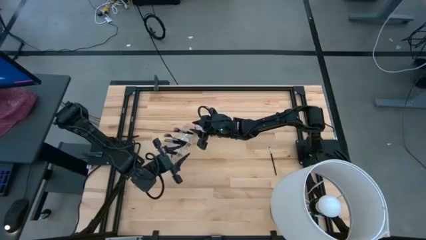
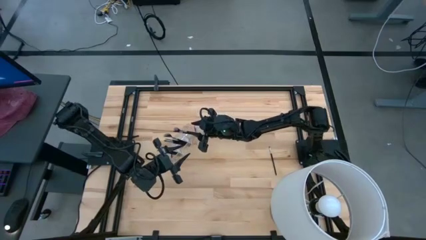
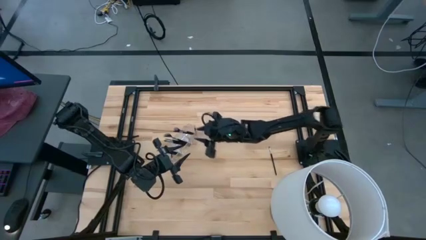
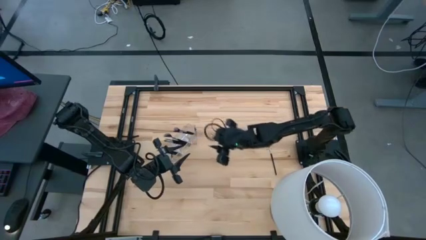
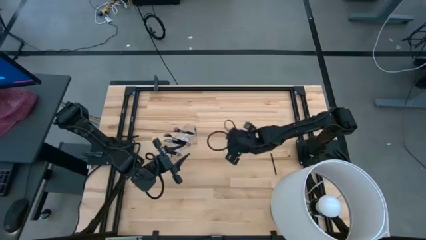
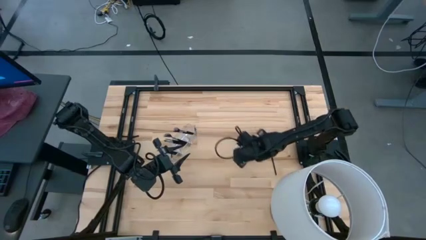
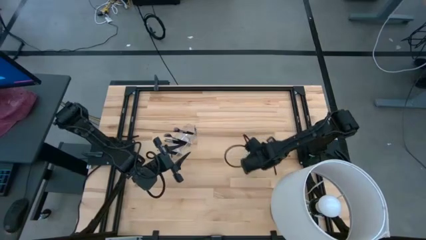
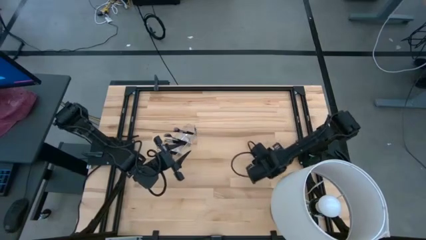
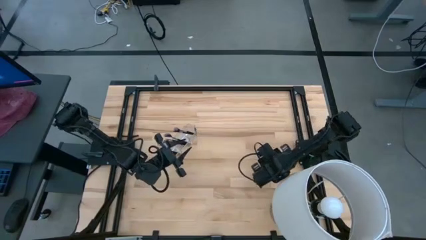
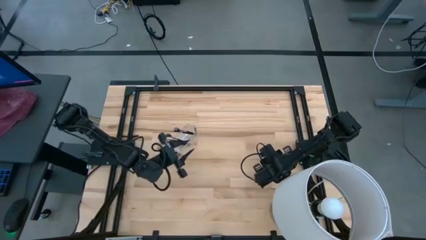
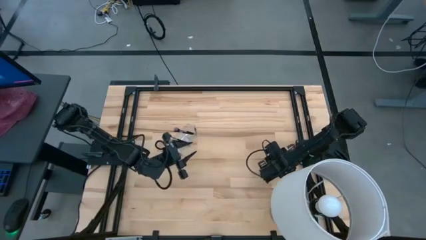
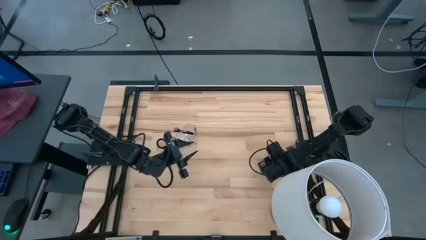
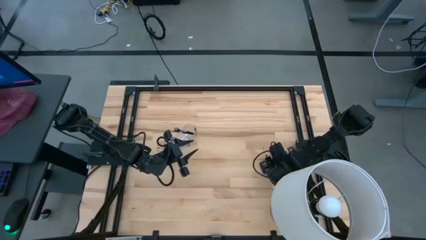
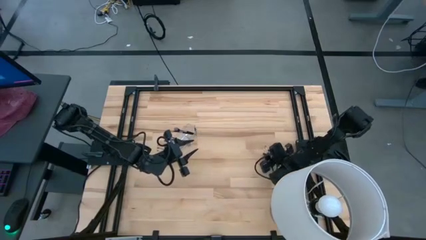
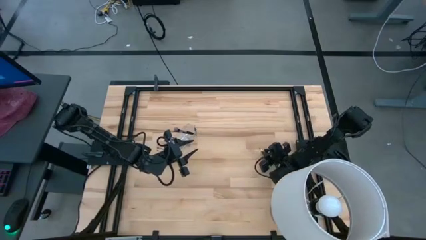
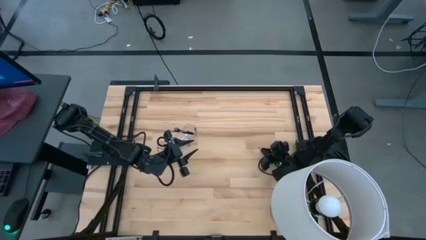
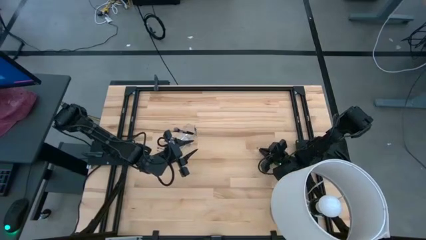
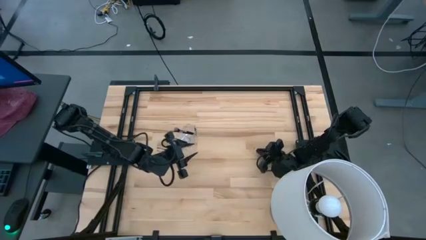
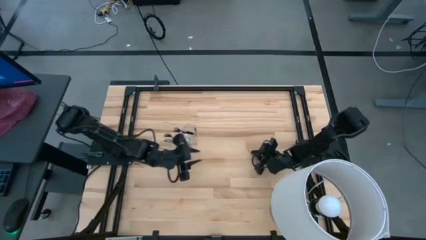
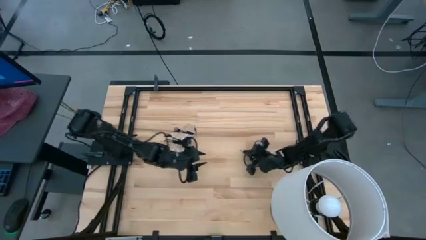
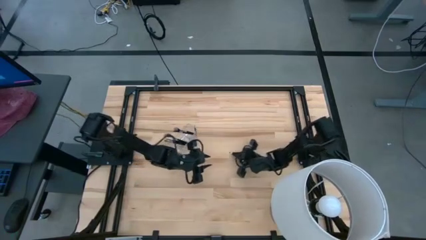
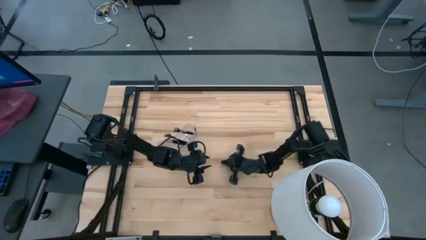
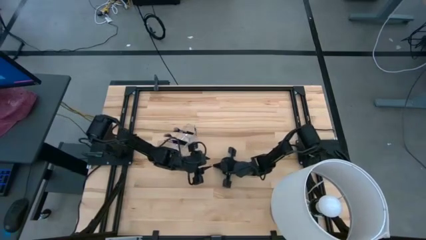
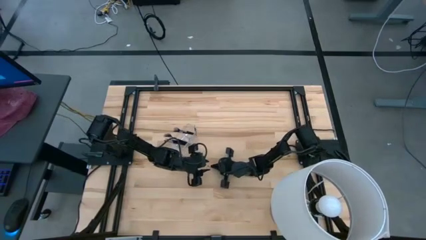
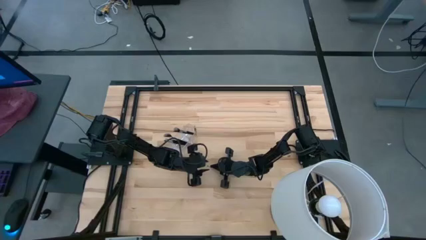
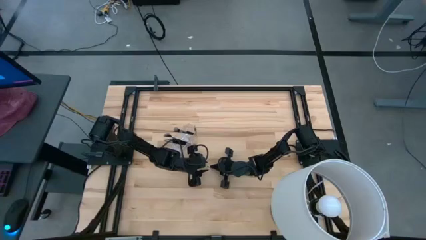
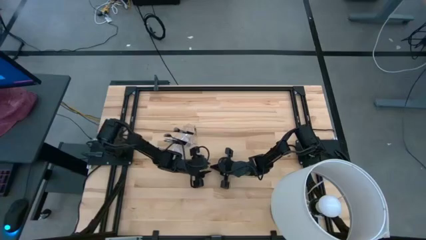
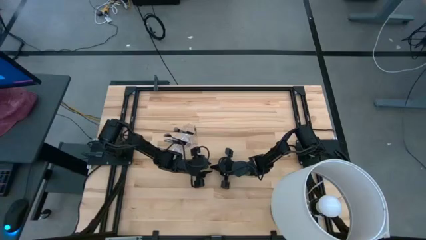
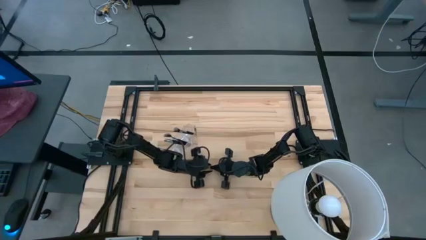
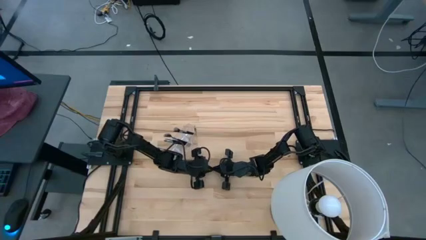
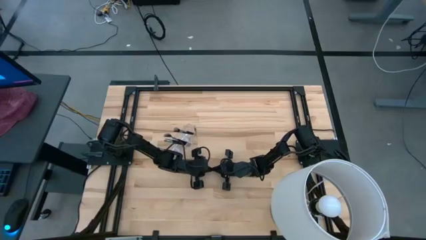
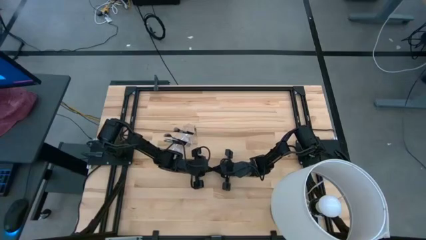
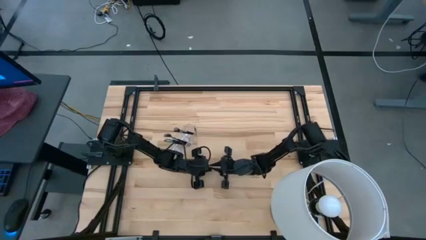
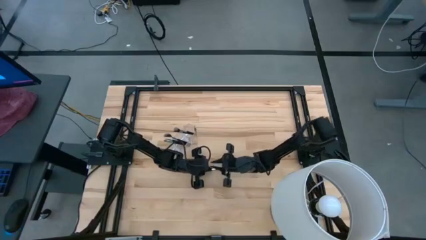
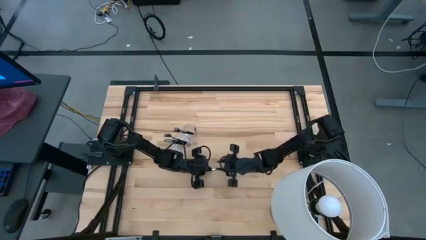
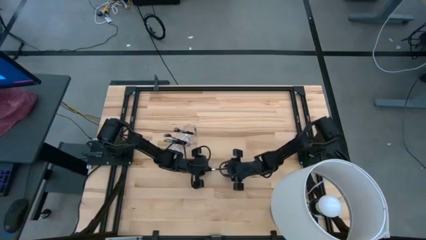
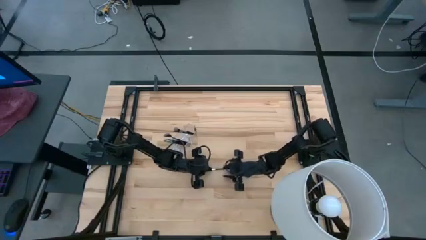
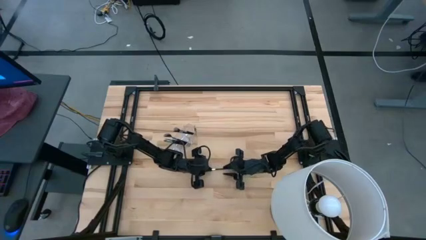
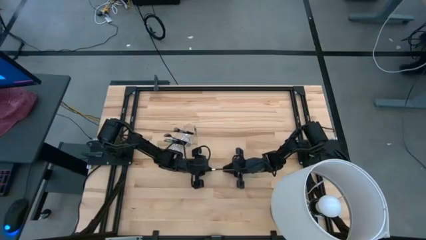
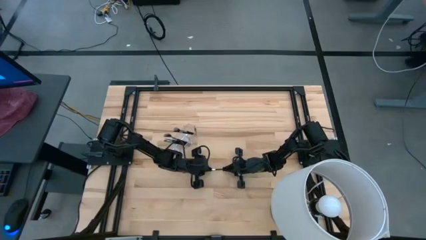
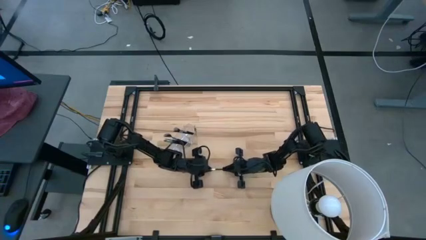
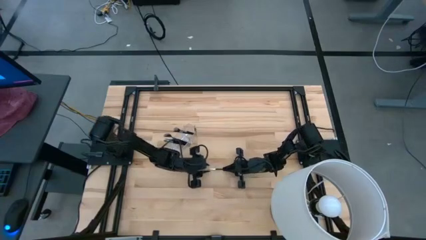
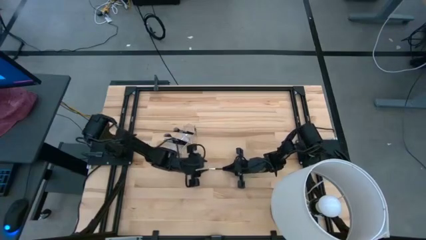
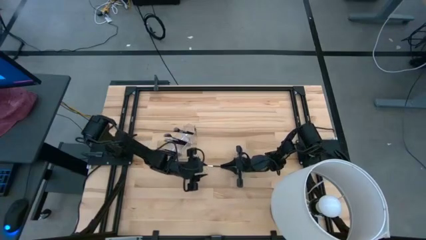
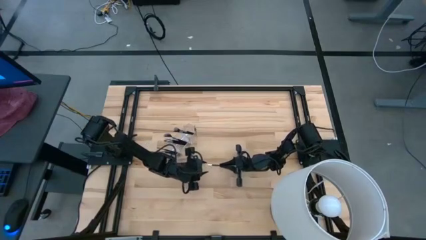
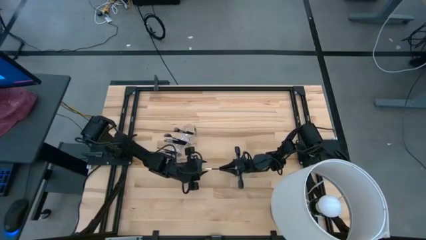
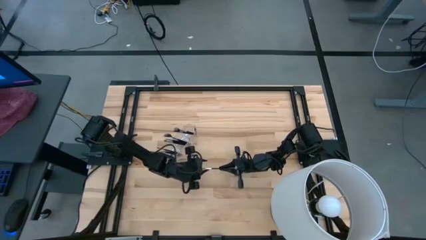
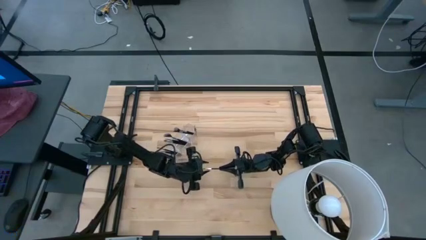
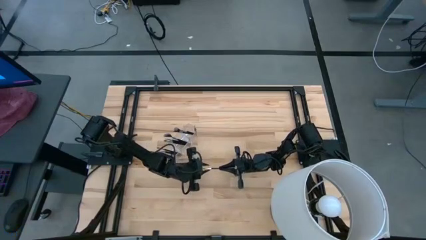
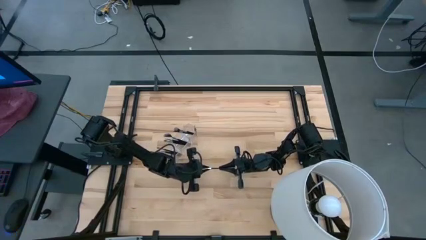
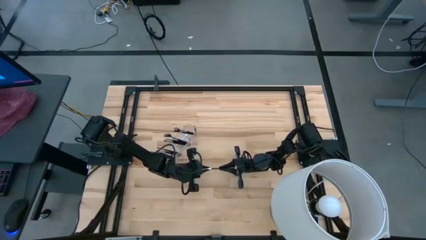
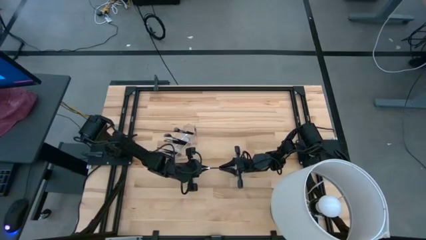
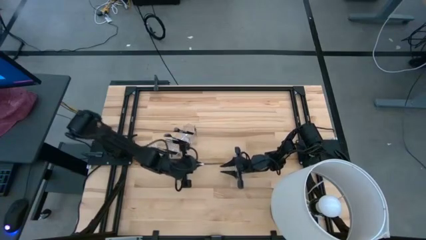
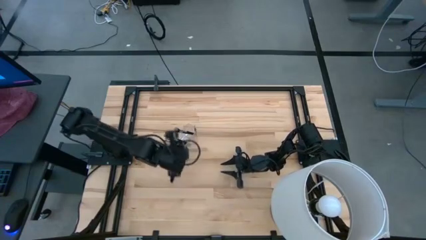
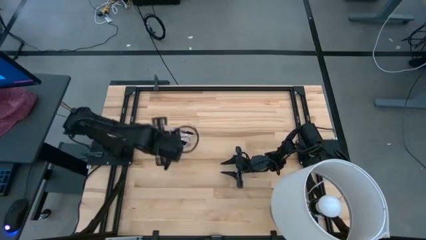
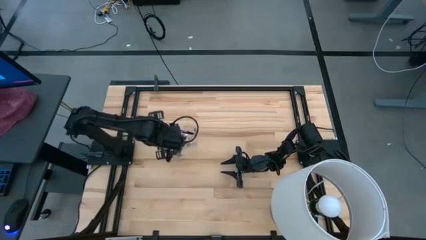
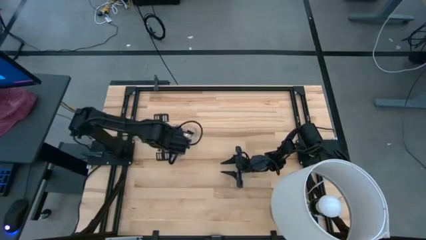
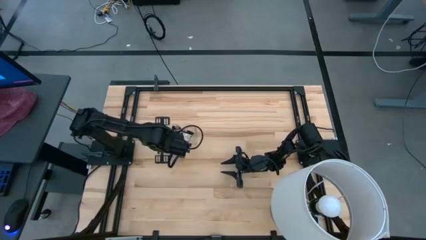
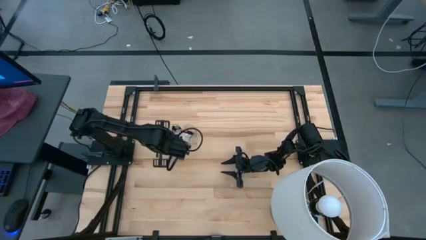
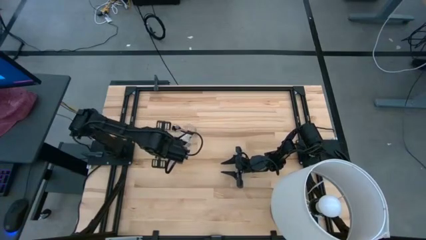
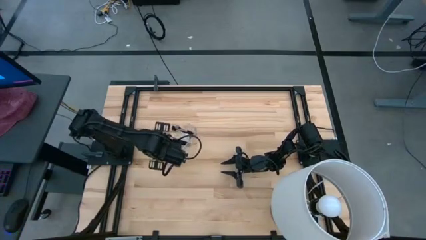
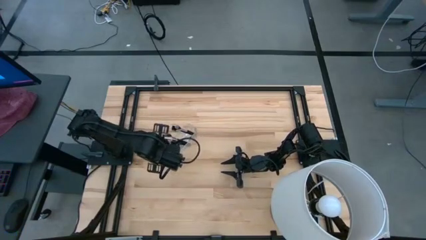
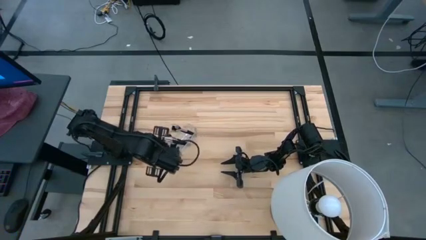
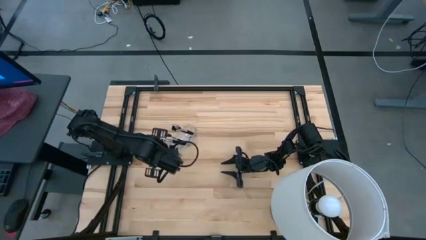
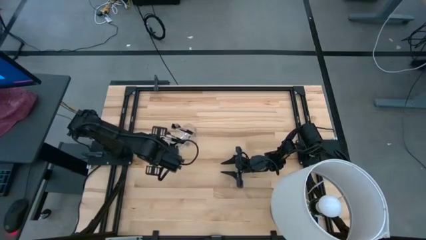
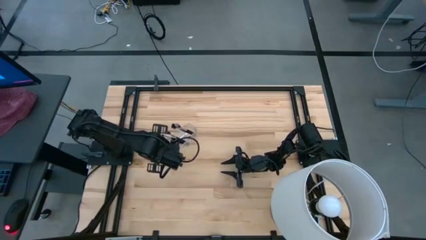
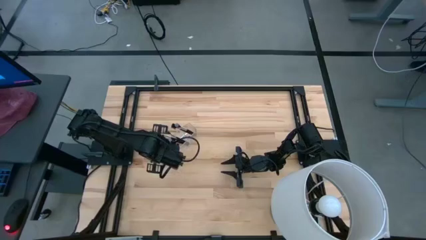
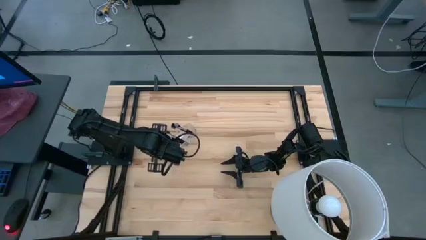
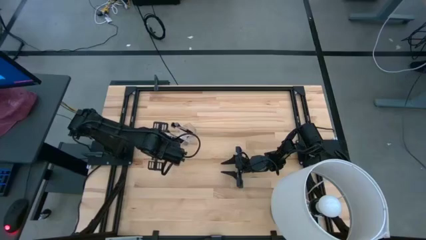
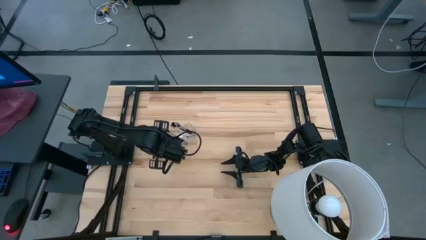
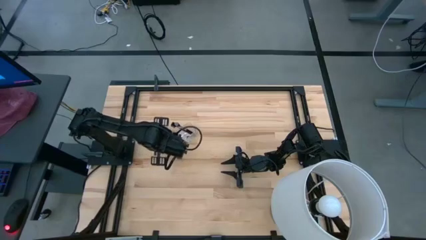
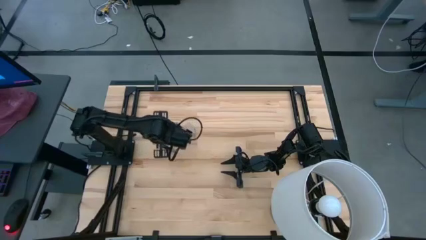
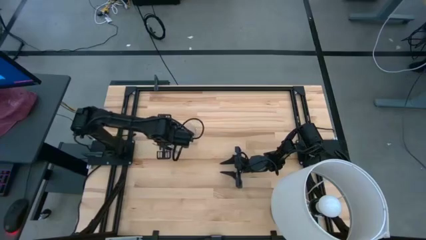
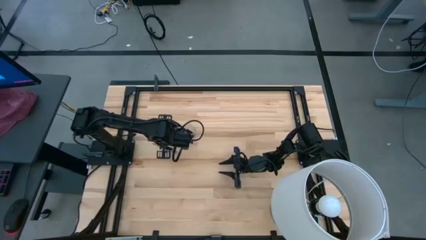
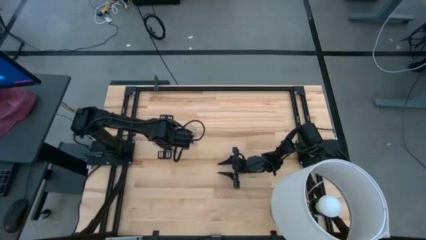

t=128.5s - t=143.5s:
Task: Put items in baskets/containers
Put the eyeshadow brush into the middle section of the transparent organizer

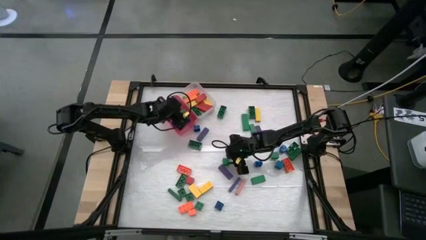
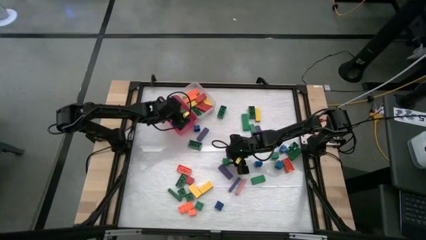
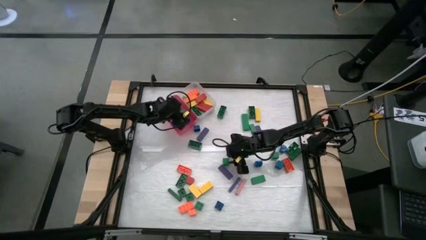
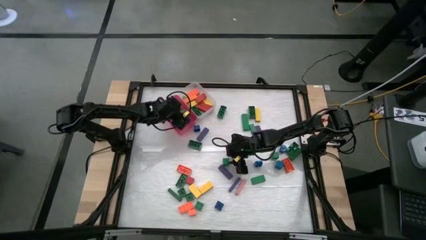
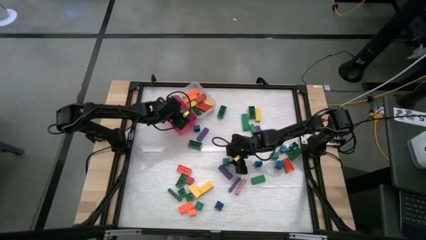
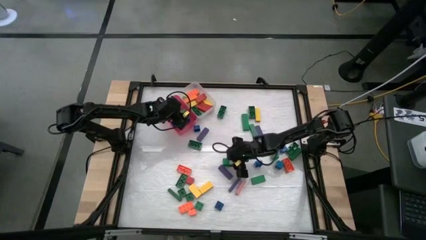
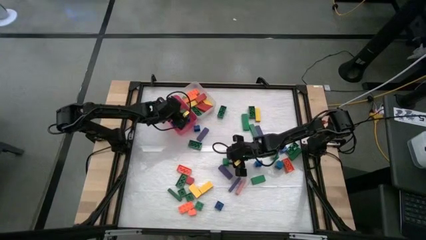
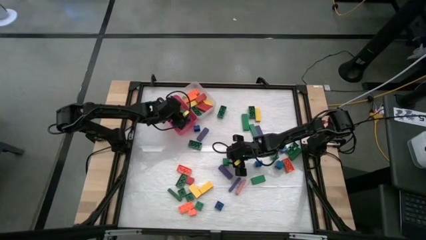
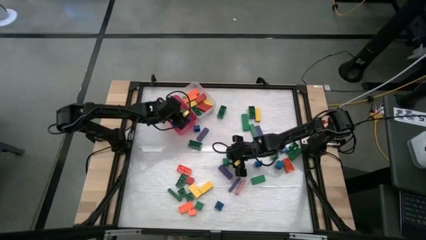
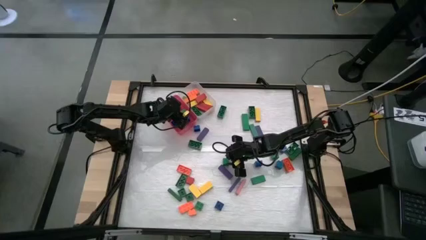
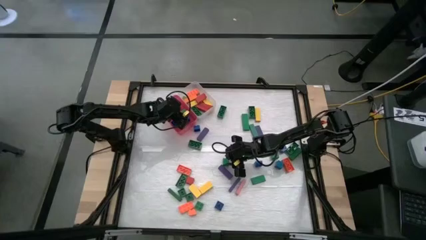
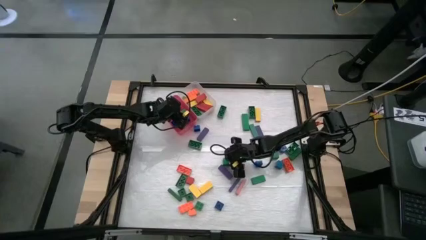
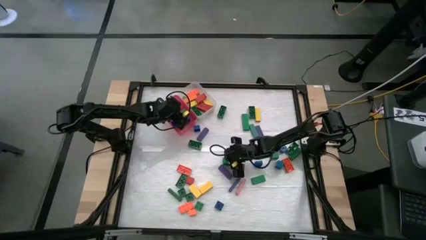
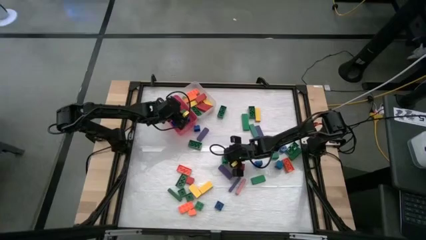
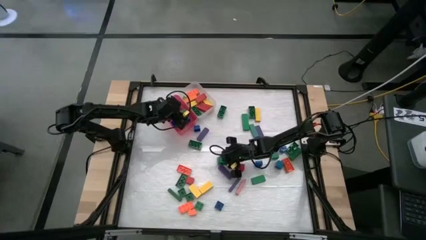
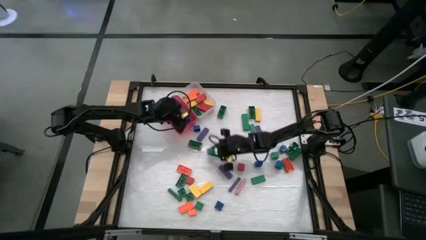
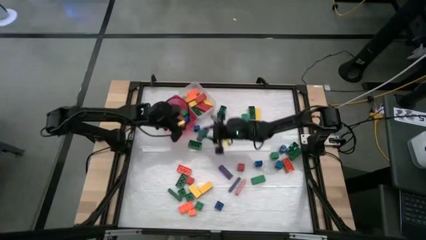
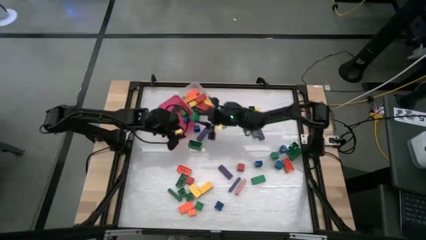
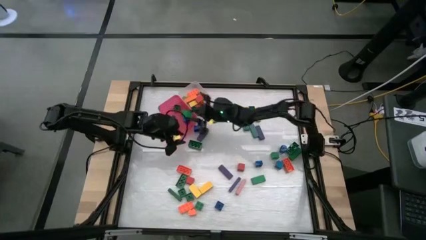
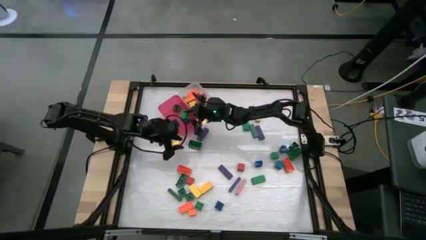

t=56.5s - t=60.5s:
Task: Sort blocks by size
Put the small green block into the pink bin
